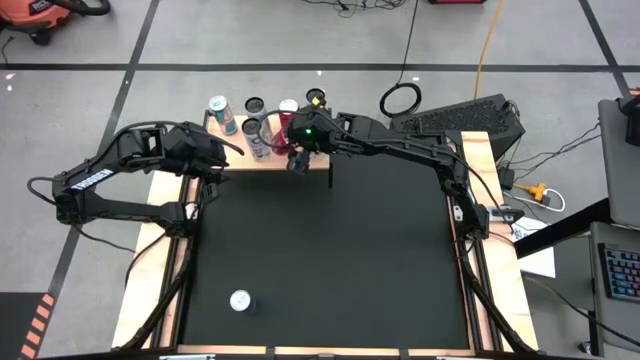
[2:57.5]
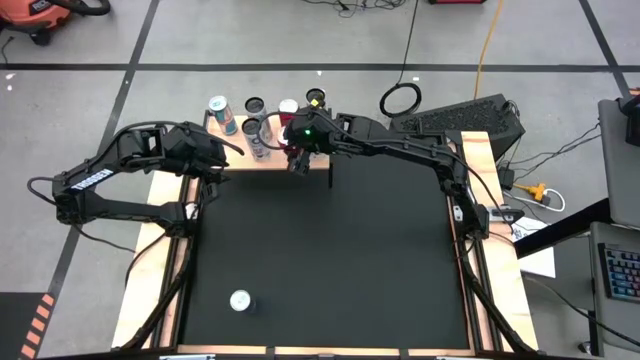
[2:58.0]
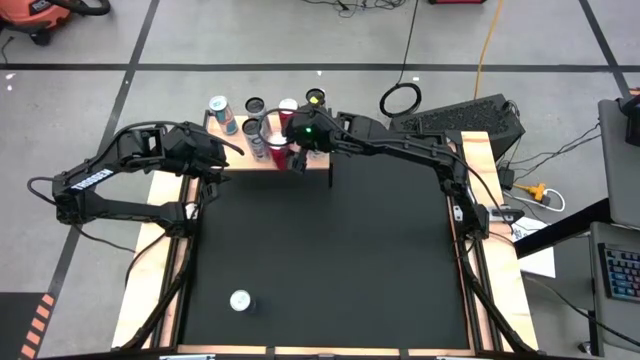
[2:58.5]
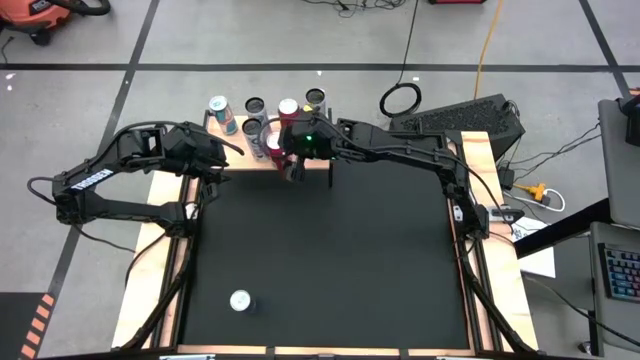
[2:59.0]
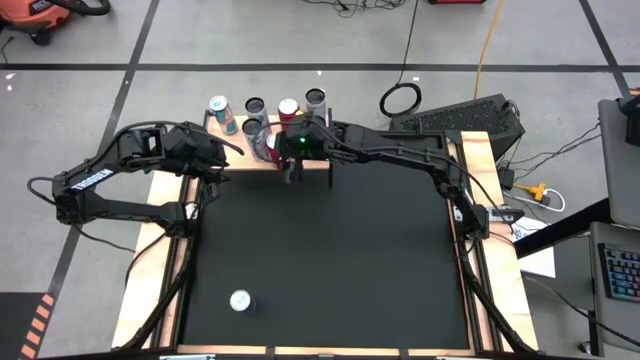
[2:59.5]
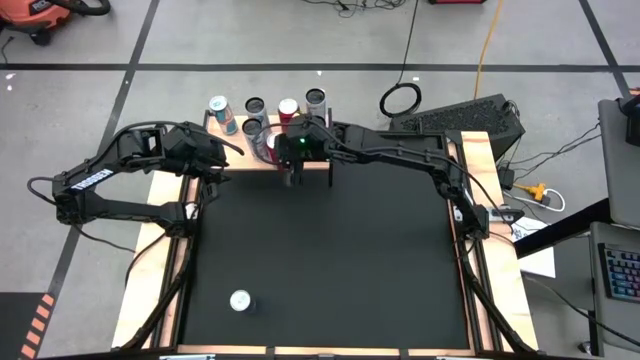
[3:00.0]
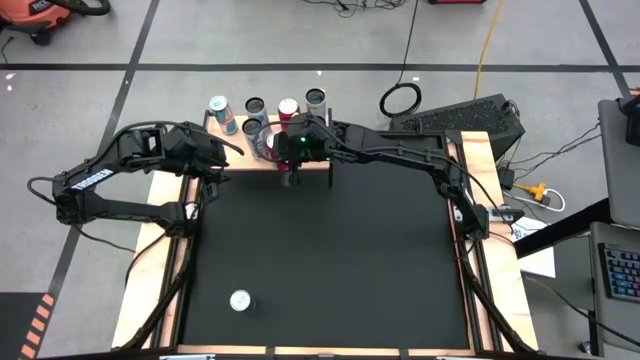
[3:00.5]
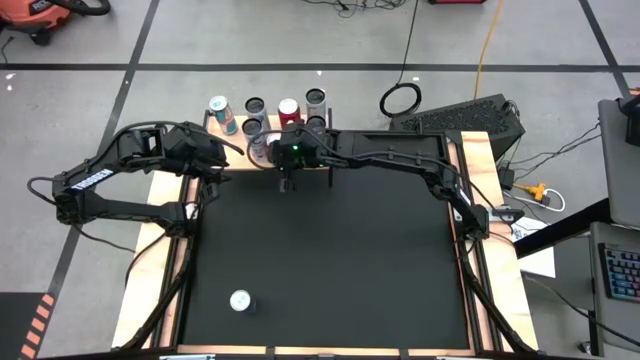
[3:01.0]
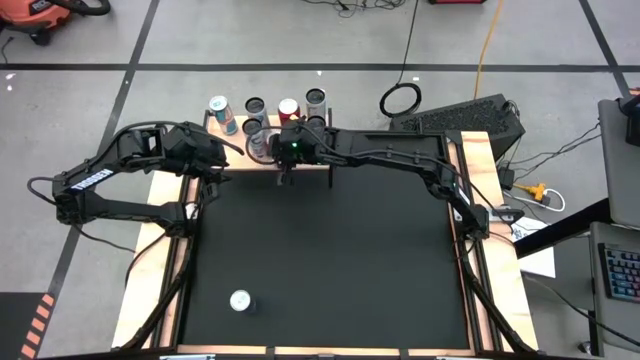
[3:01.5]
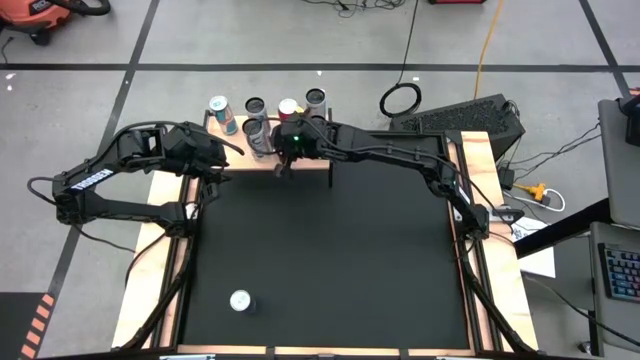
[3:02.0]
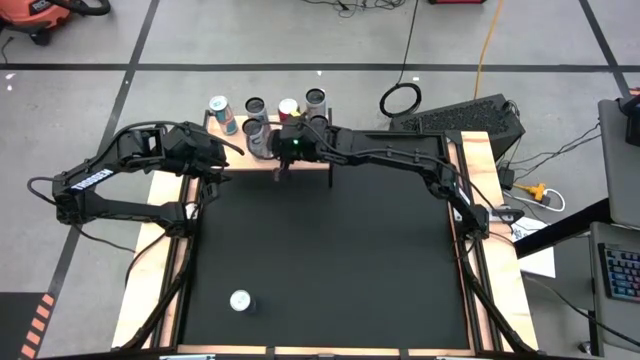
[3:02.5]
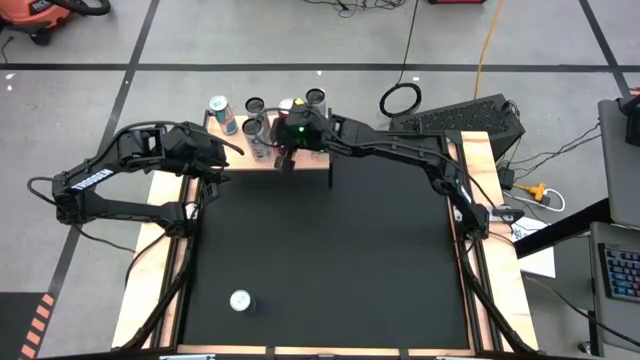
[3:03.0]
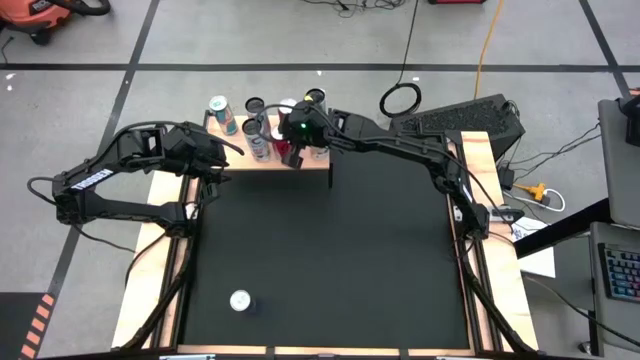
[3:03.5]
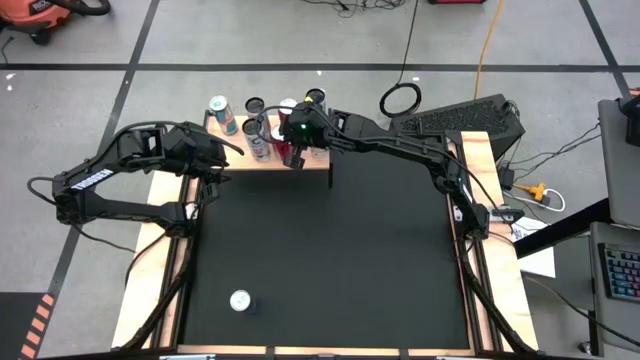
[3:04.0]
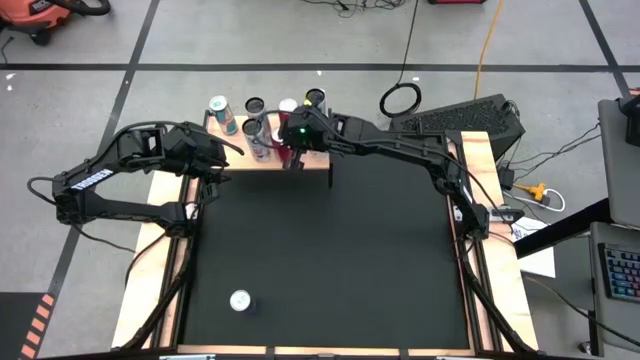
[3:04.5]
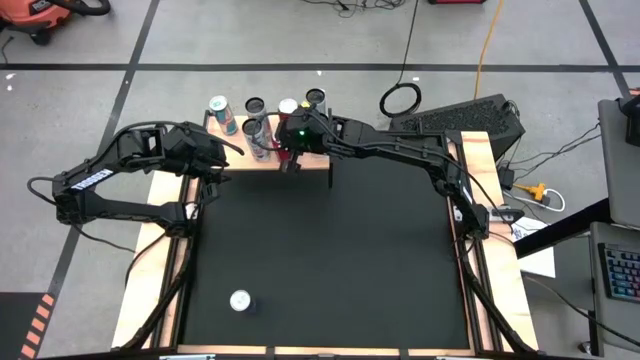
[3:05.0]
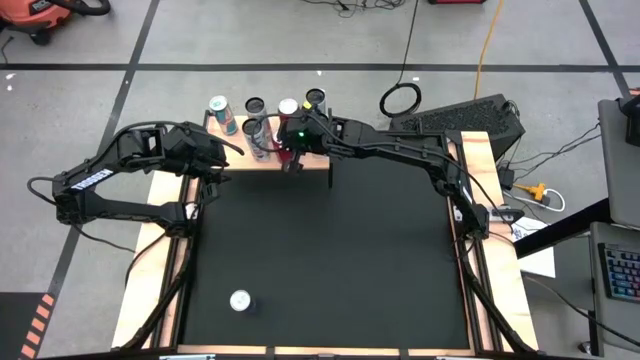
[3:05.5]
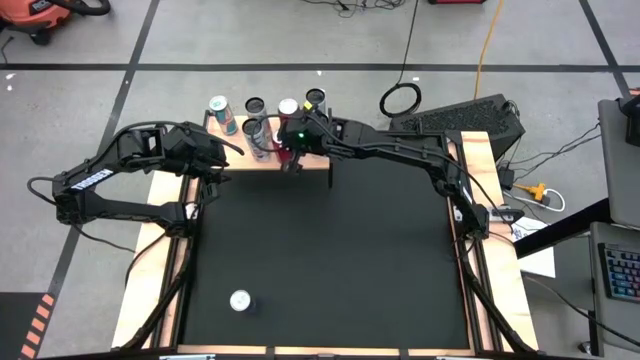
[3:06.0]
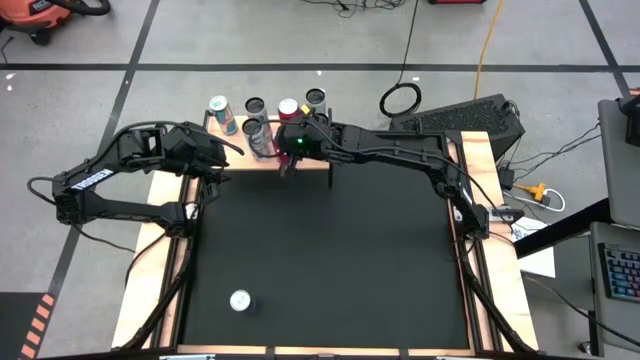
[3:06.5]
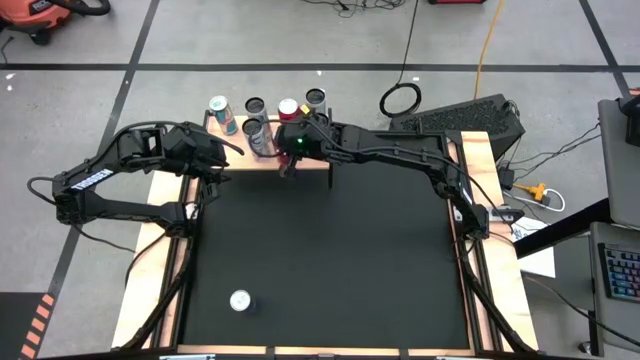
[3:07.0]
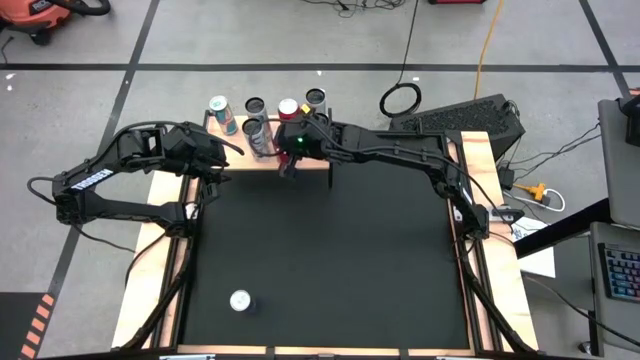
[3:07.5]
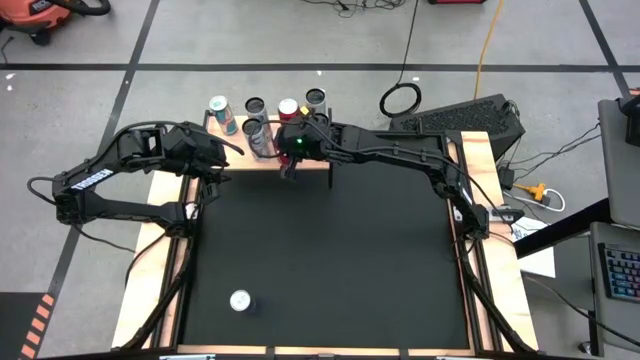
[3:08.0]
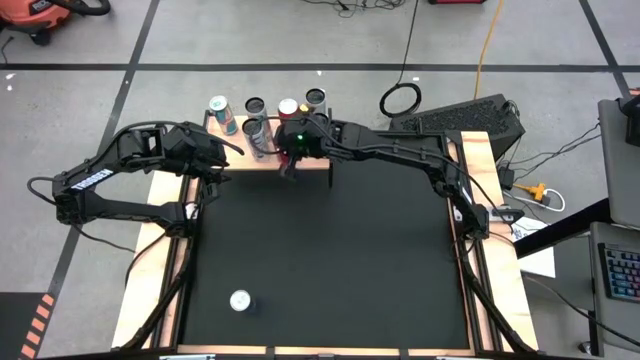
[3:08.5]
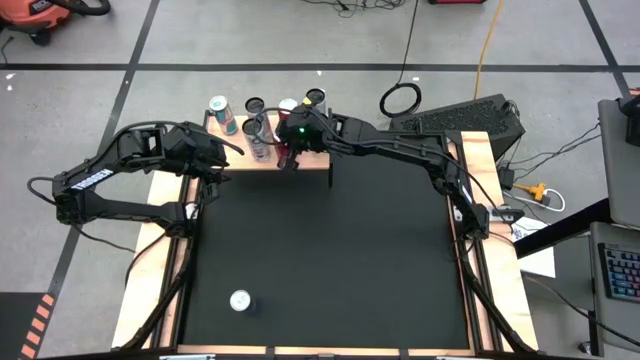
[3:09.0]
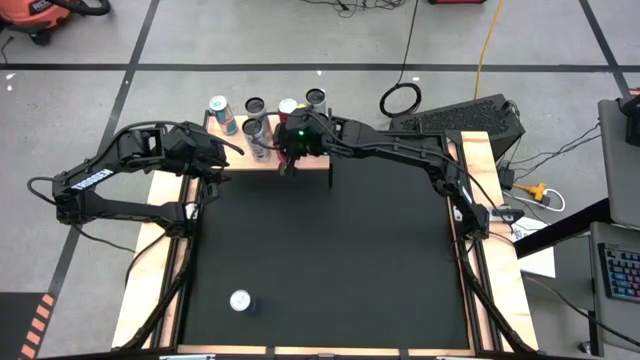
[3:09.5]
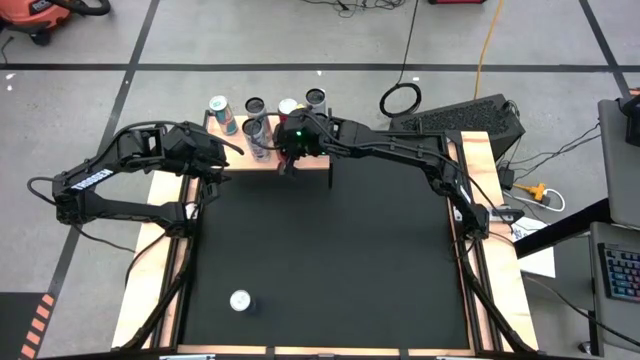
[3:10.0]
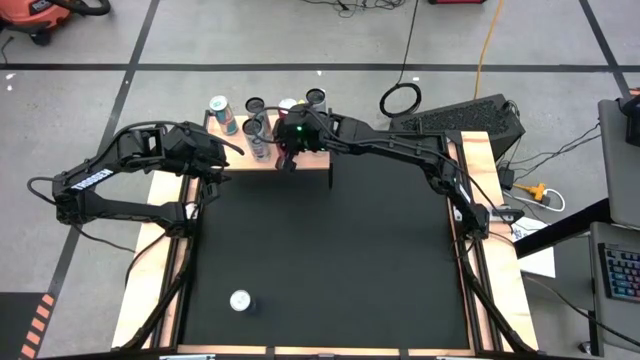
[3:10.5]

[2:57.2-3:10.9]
Task: Place canned beverage on shelf
Put the red soda can on the shelf aligned with the other red soda can

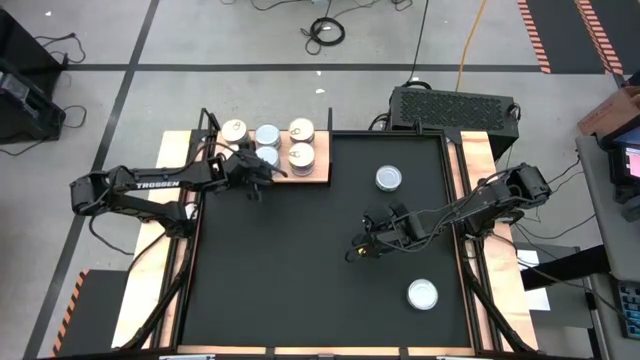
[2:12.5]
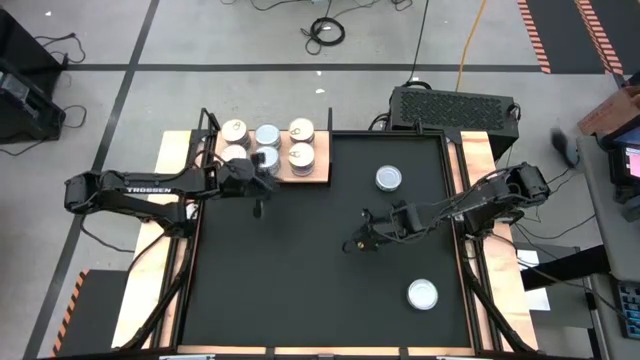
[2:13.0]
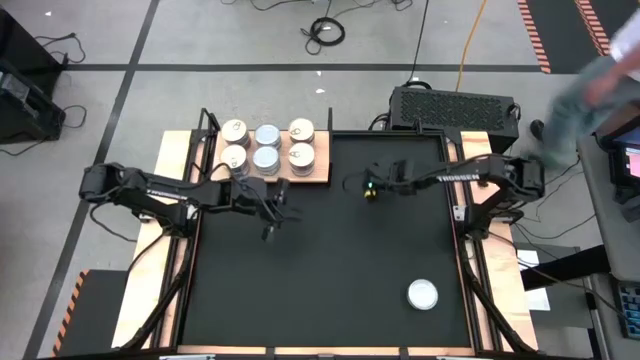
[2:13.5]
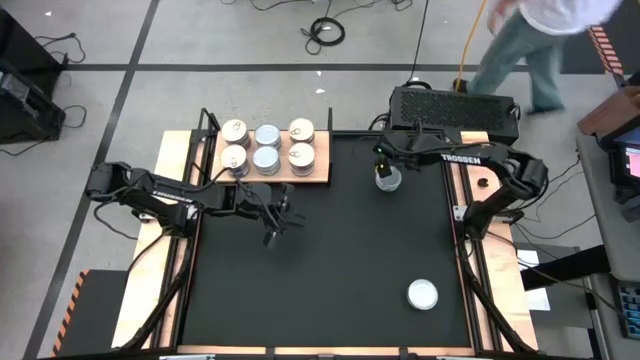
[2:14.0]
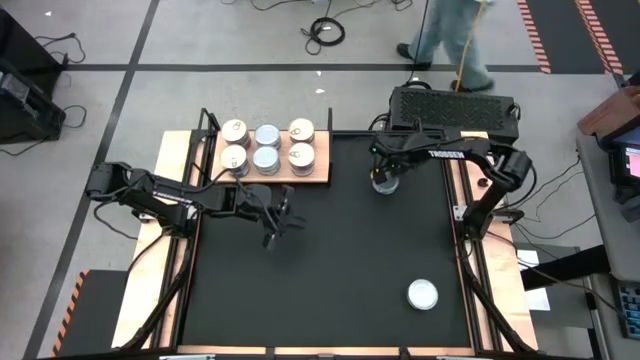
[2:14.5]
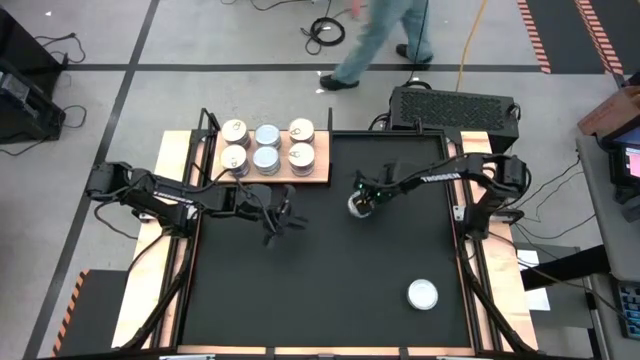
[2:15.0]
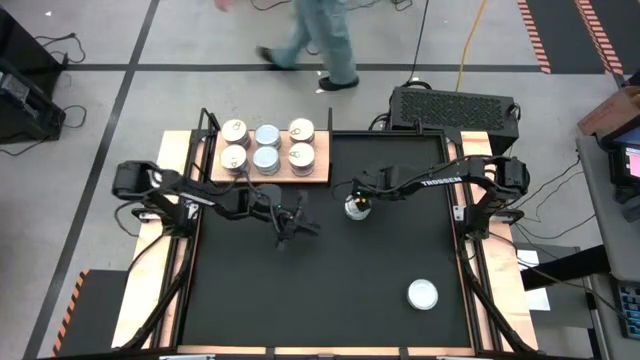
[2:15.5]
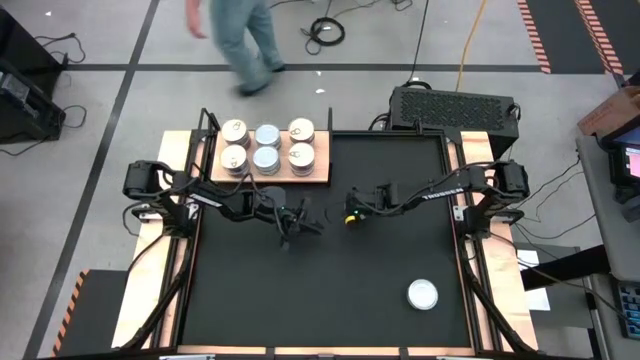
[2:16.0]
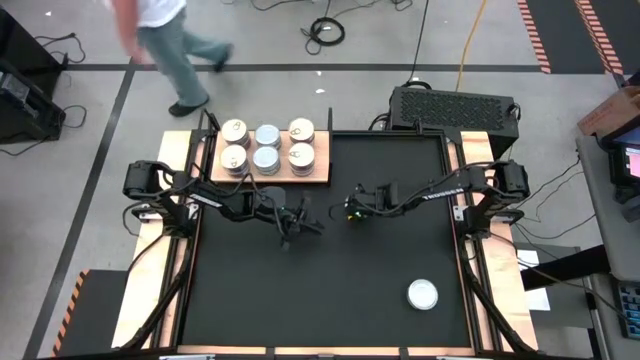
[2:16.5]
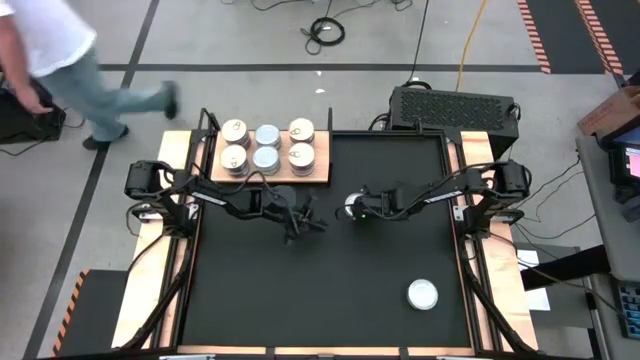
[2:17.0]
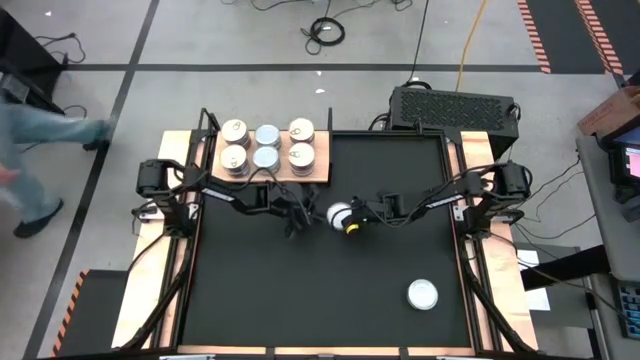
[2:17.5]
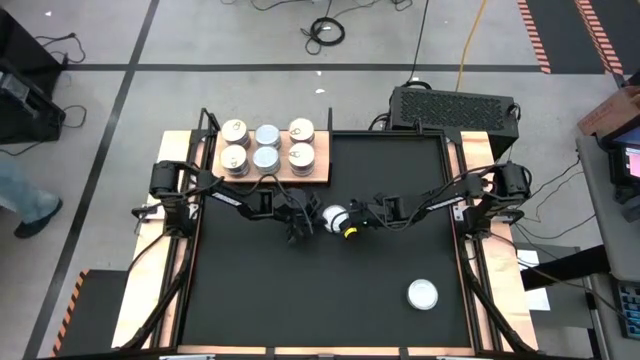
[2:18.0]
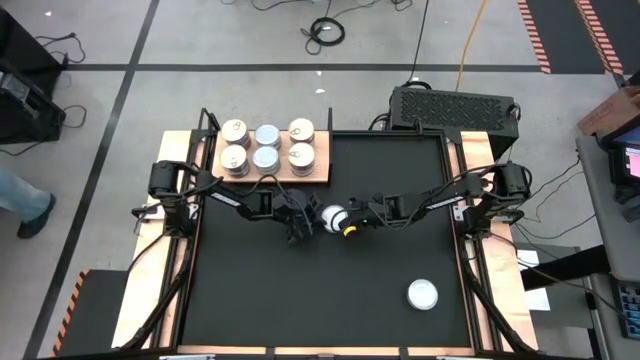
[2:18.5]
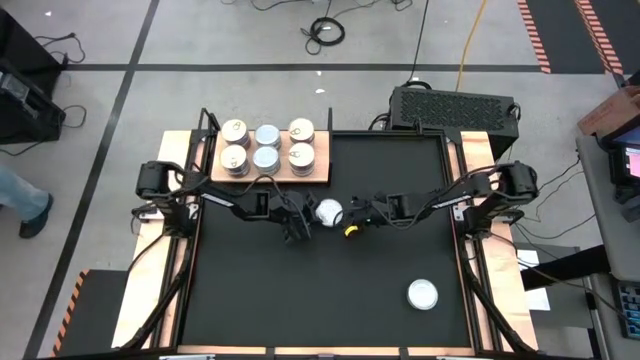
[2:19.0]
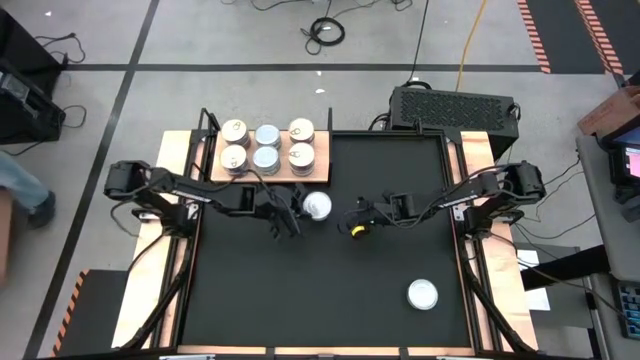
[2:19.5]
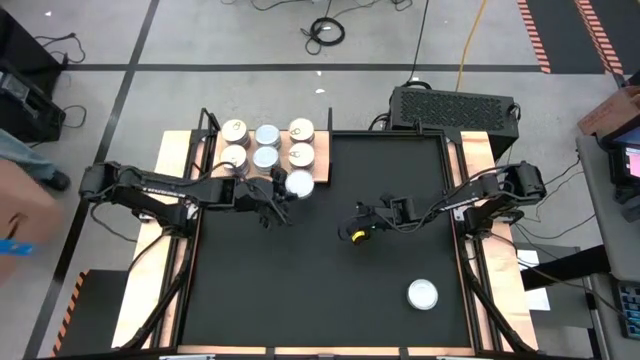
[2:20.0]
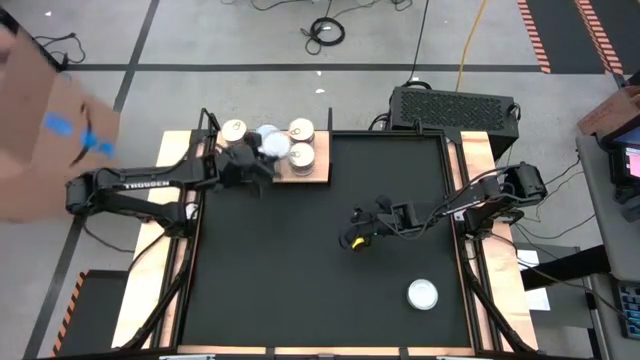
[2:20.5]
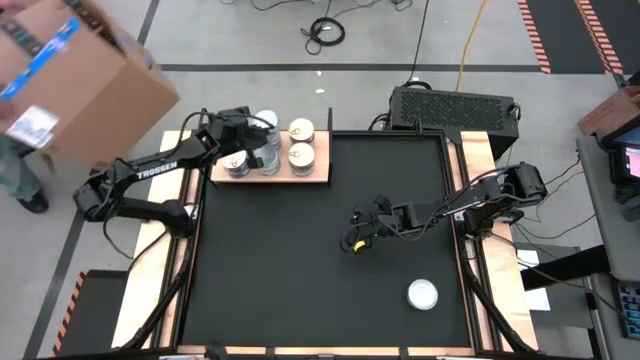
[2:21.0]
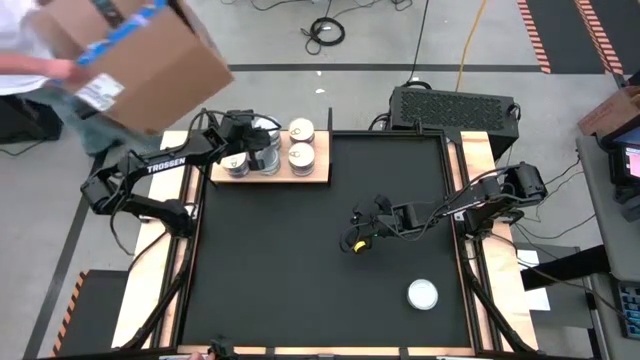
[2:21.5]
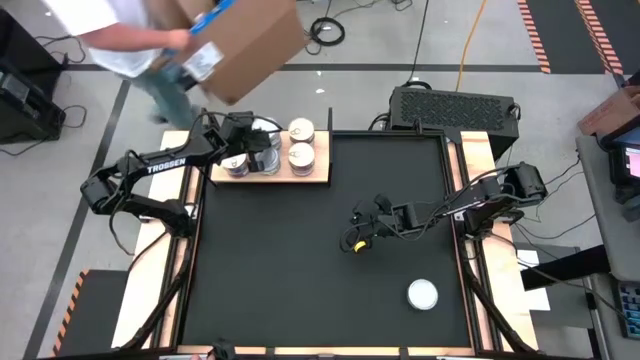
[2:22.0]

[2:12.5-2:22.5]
Task: Stack canned seafood by type on shelf
Stack the green tuna can on top of the green tuna can on the shelf
